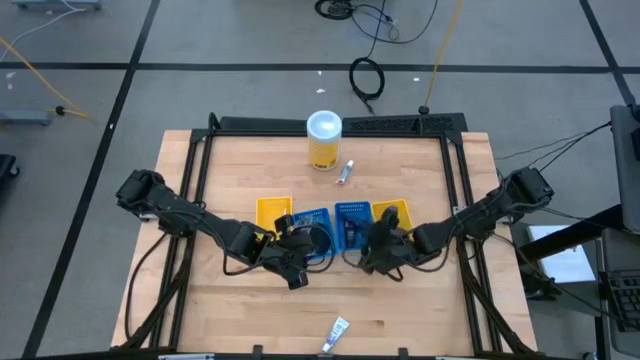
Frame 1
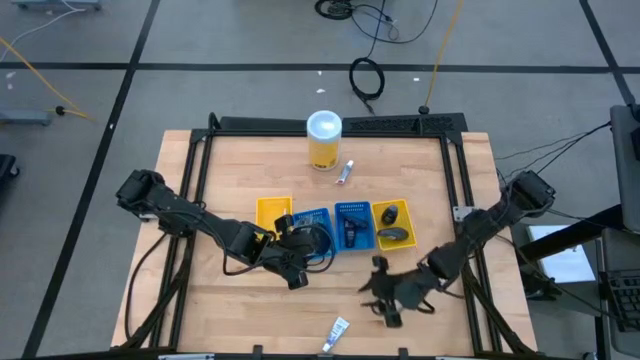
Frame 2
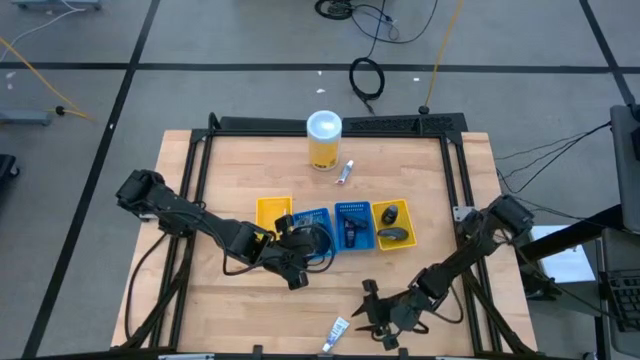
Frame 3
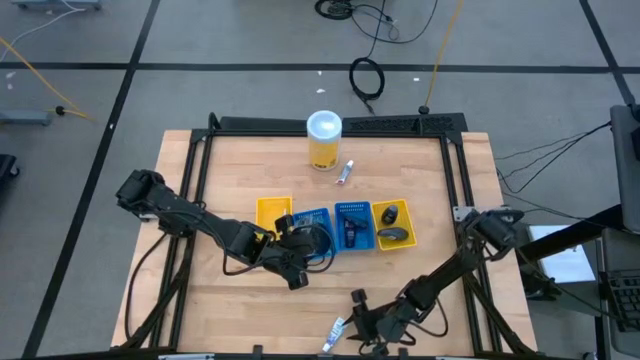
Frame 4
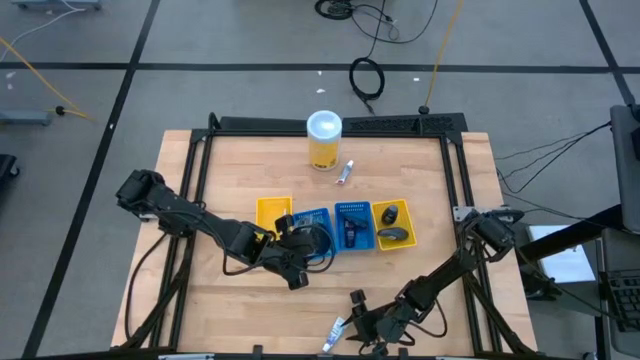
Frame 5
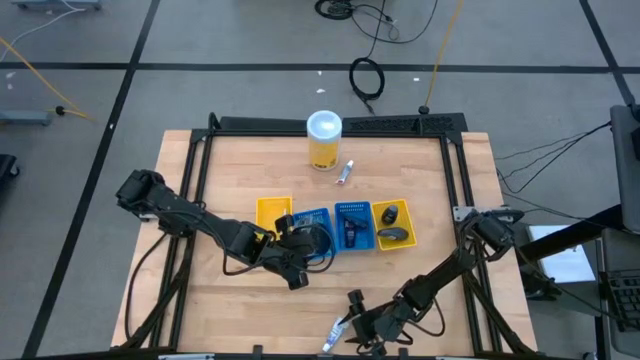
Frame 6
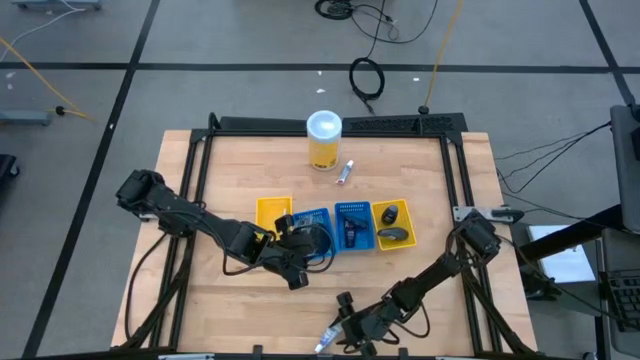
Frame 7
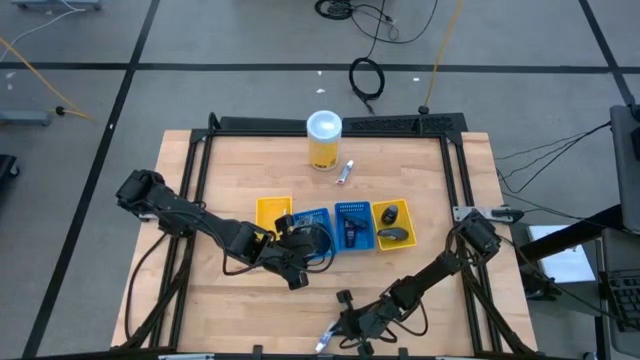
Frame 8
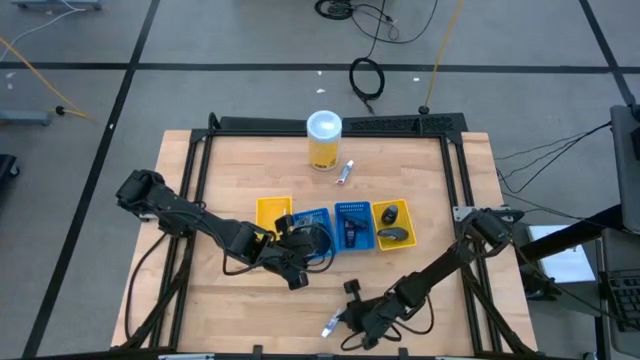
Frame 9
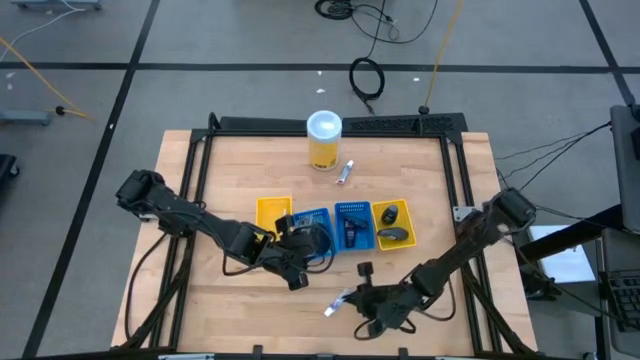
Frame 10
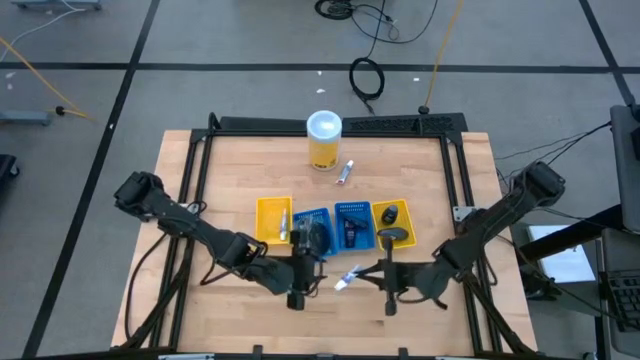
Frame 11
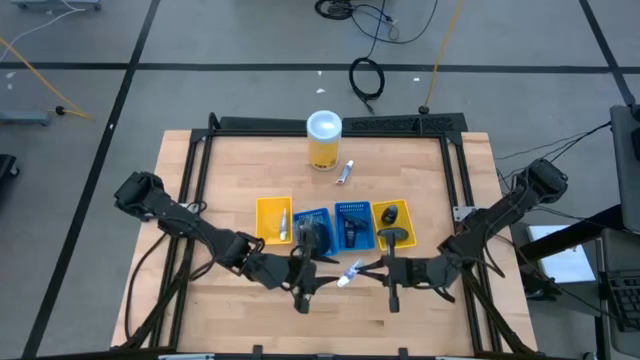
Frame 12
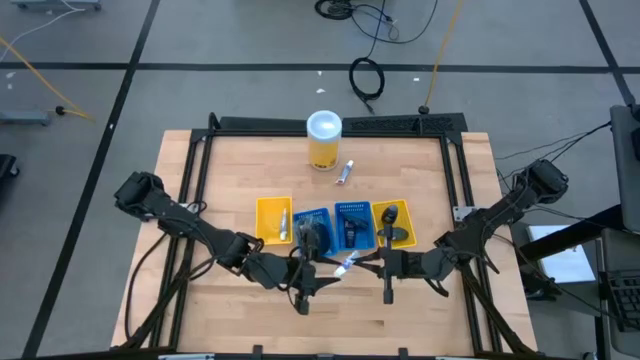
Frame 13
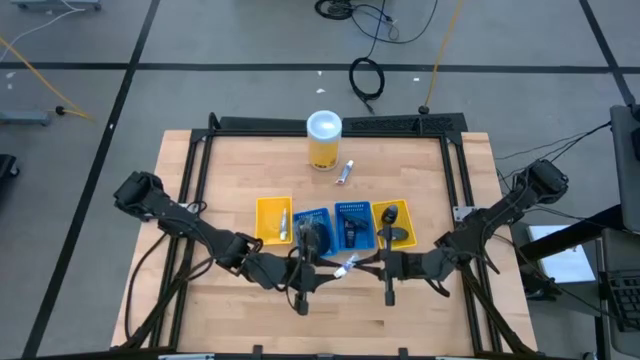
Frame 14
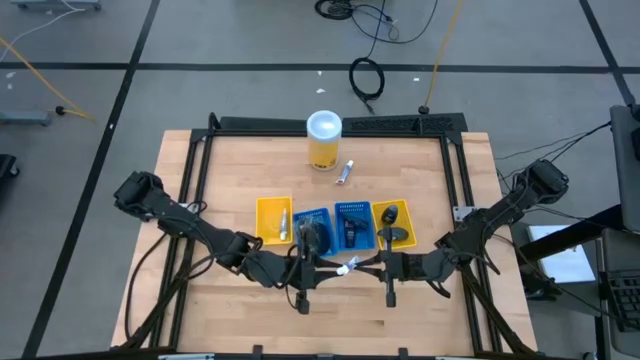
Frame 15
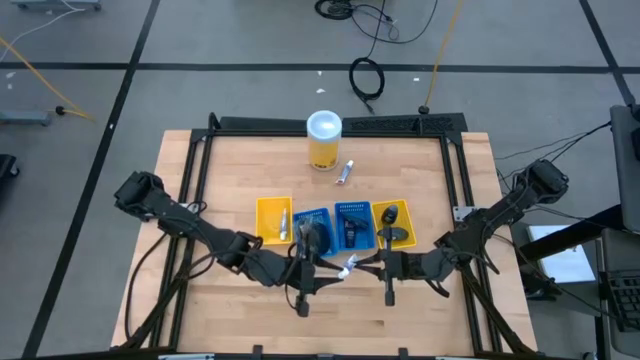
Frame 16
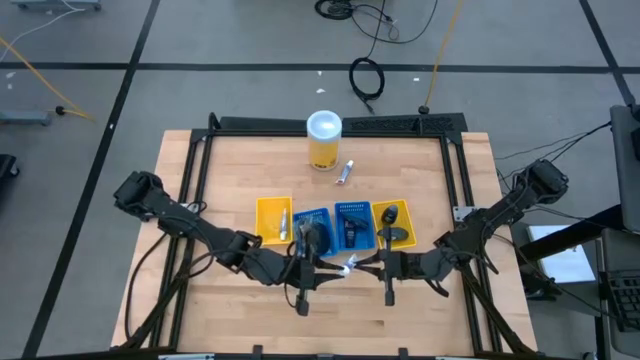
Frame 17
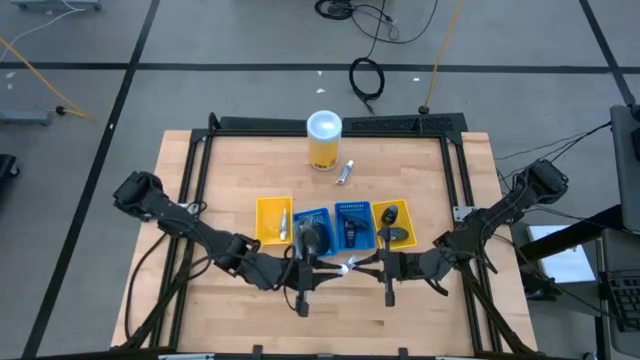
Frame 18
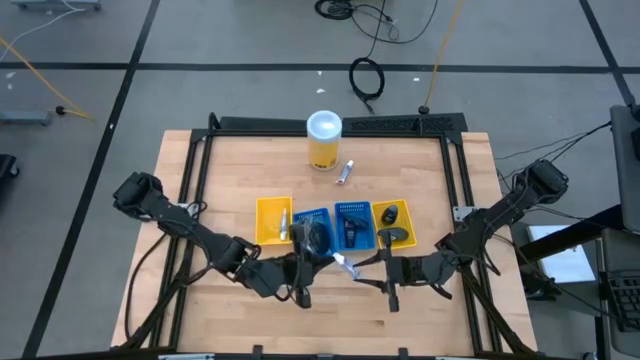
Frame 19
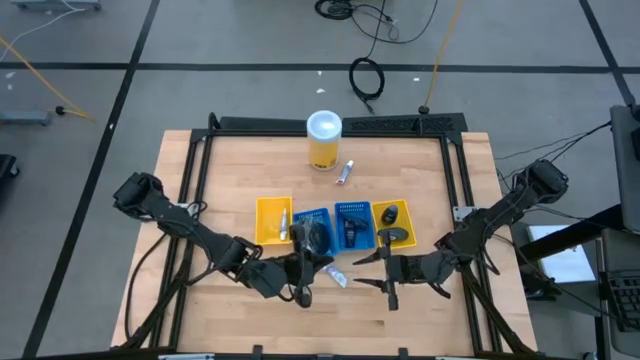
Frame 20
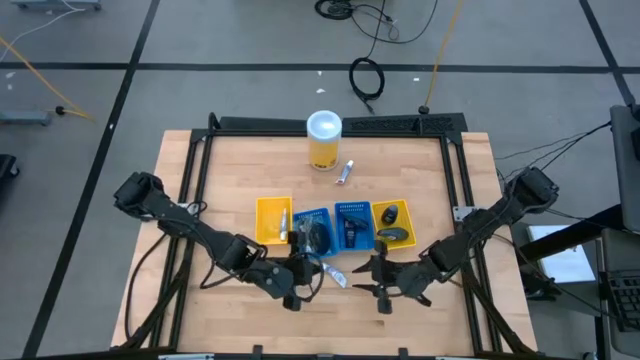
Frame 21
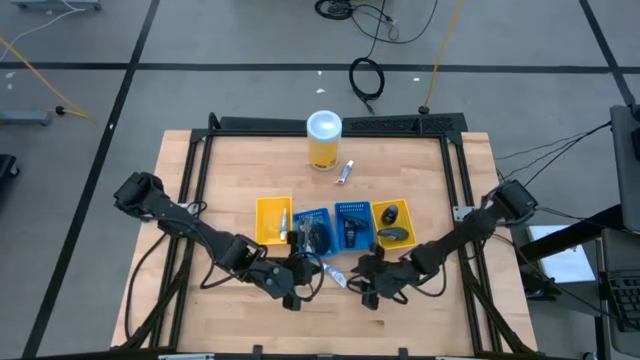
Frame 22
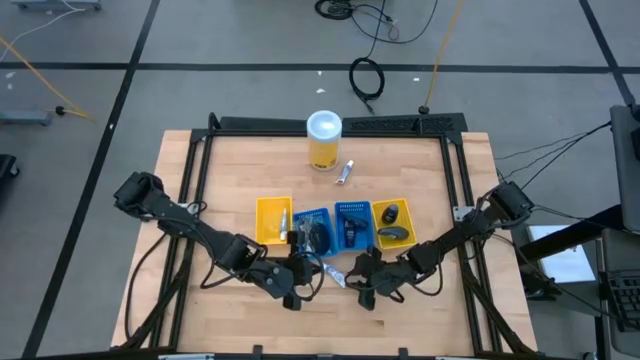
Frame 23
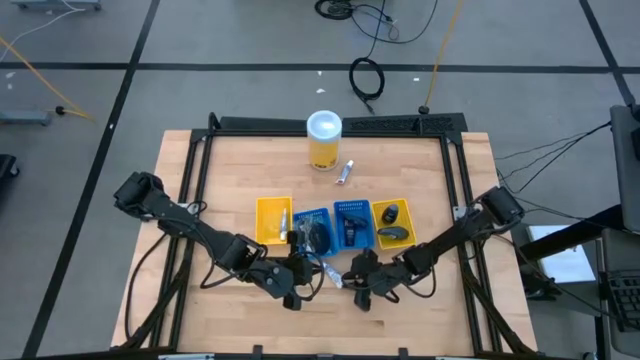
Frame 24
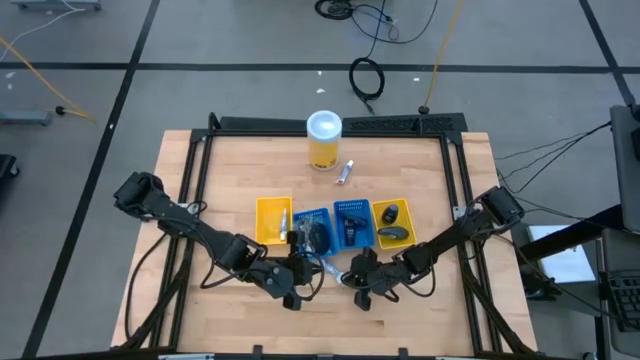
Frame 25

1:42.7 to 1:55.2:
Task: Pick & Place Travel size toiletries
Put the white toothpaste into the left yellow bin

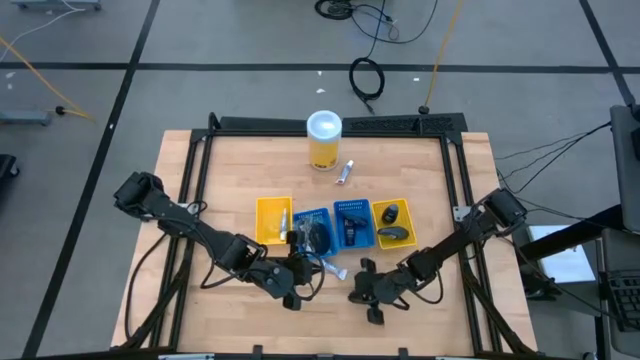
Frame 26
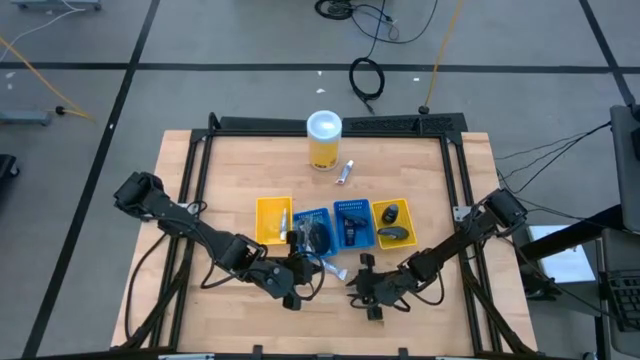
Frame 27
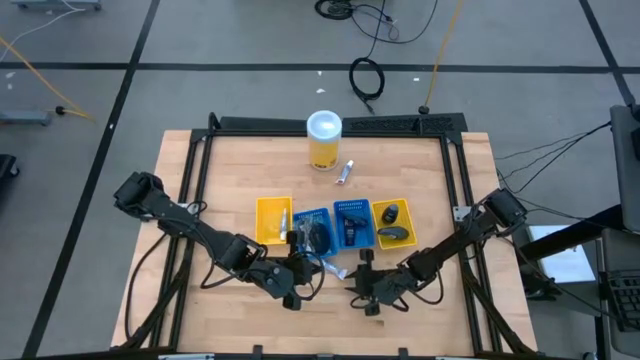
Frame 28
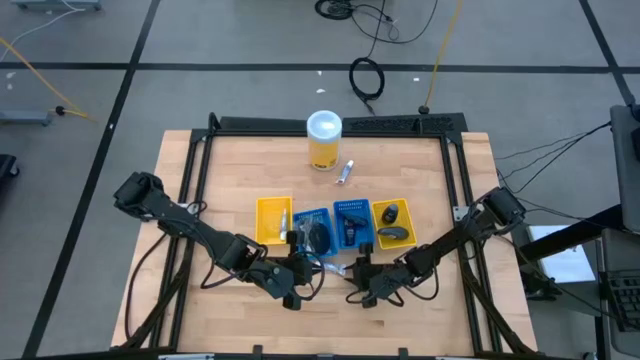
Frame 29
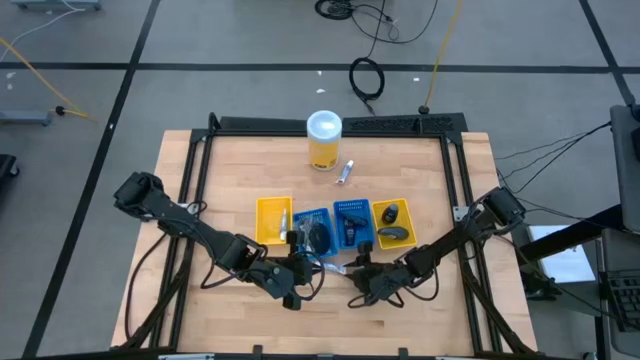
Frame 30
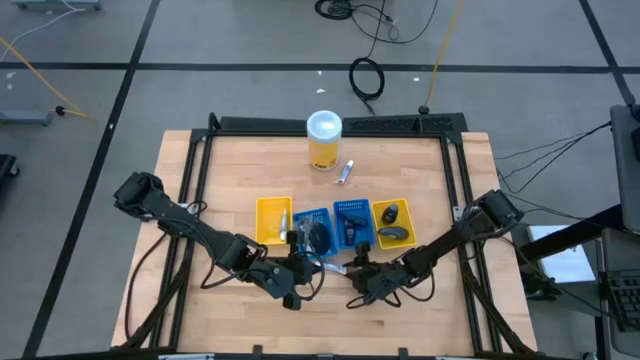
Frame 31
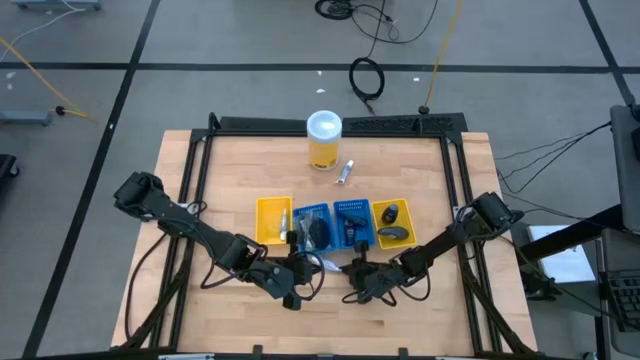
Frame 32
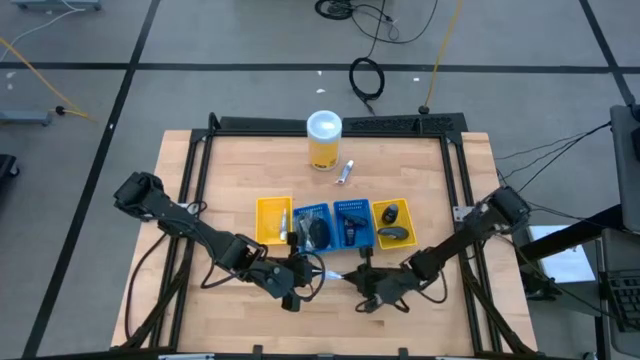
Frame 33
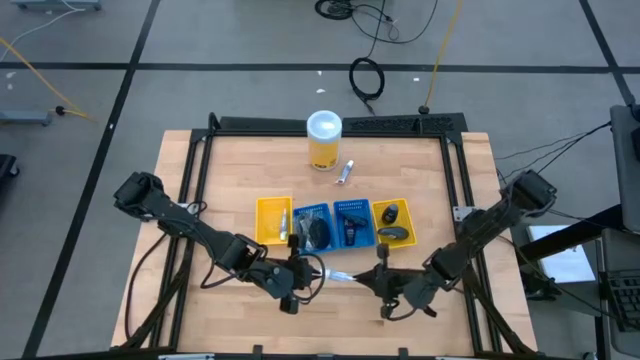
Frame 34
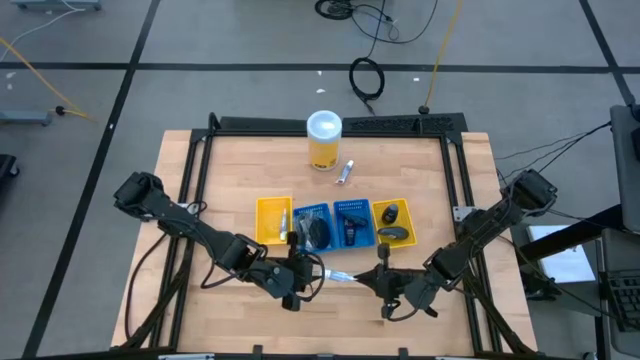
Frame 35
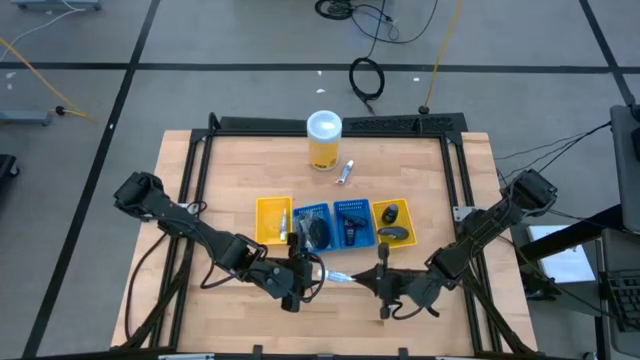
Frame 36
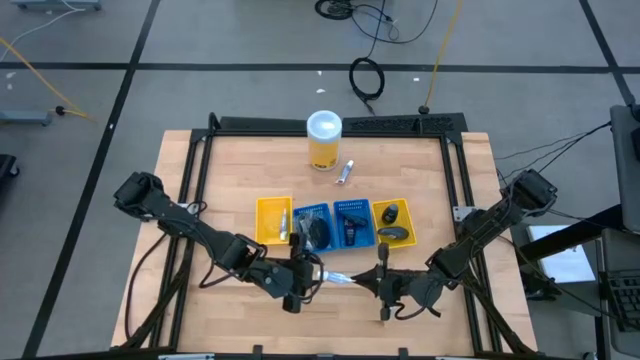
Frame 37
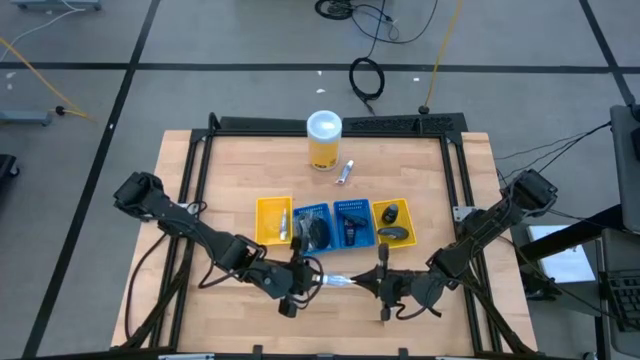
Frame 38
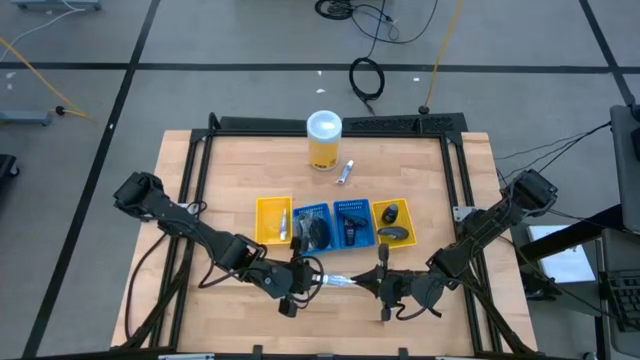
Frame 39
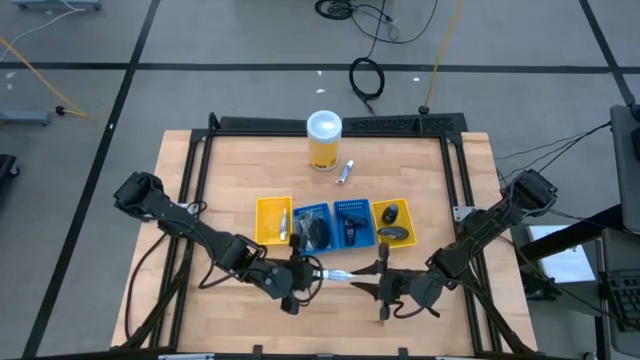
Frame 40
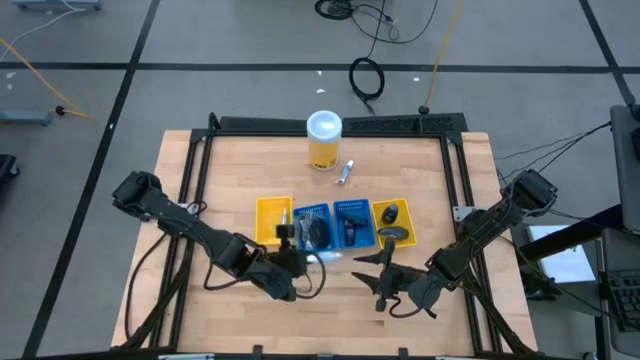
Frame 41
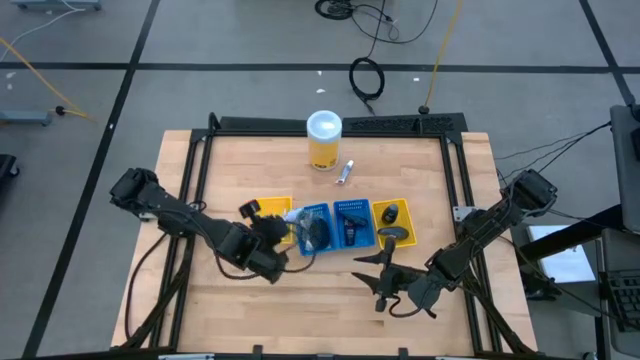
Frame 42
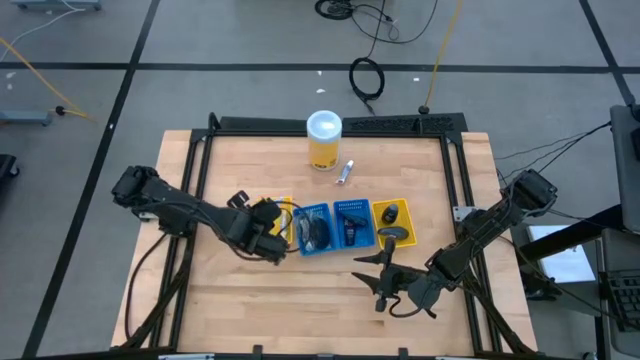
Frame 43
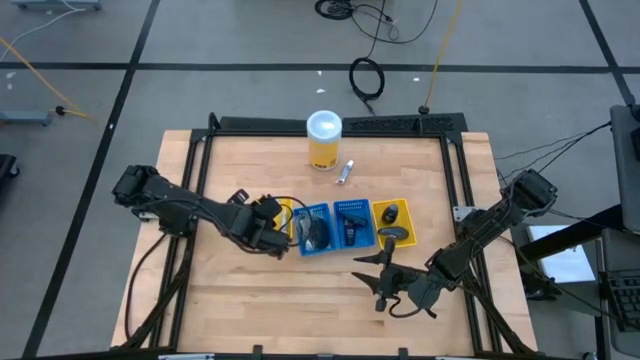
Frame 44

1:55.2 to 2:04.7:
Put the white toothpaste into the left yellow bin
